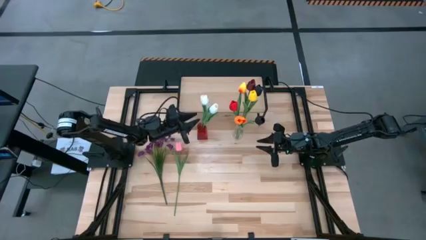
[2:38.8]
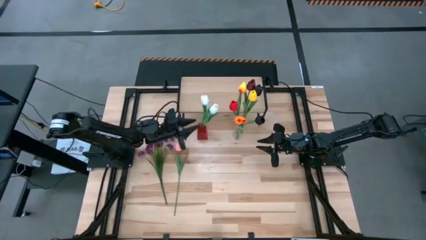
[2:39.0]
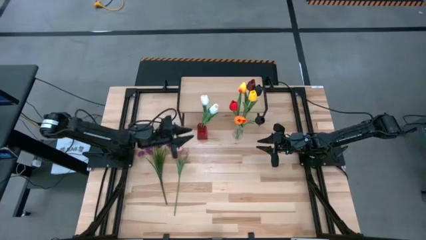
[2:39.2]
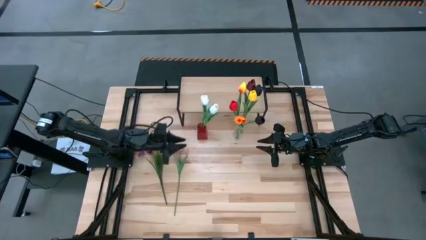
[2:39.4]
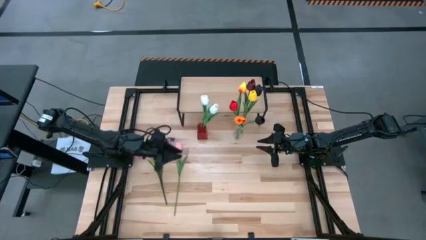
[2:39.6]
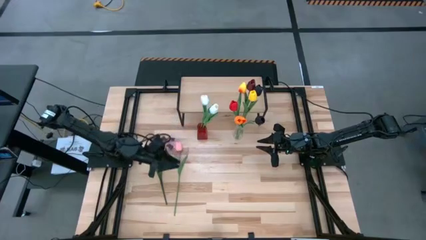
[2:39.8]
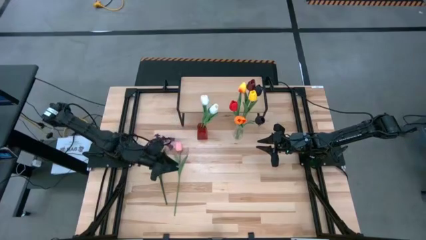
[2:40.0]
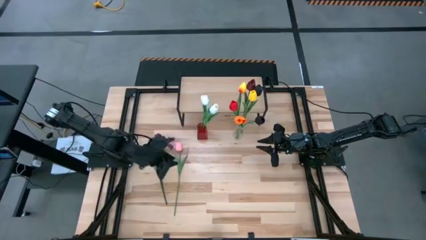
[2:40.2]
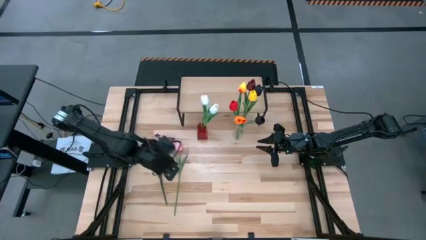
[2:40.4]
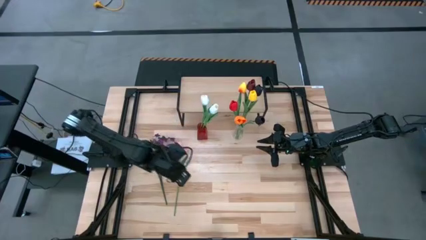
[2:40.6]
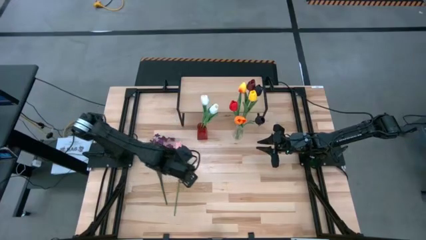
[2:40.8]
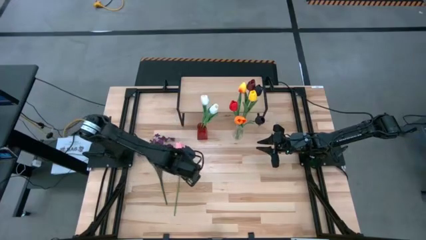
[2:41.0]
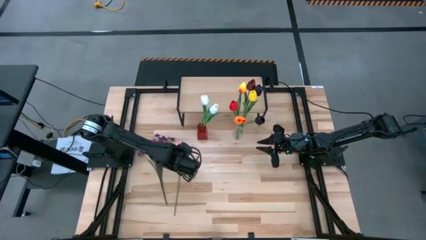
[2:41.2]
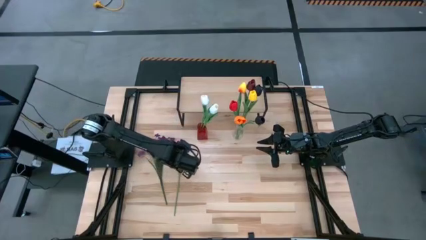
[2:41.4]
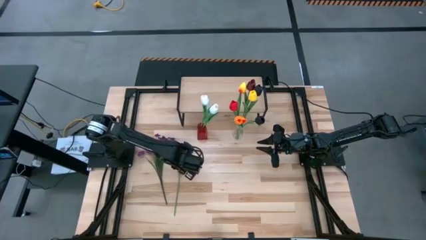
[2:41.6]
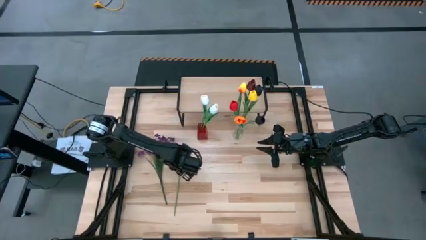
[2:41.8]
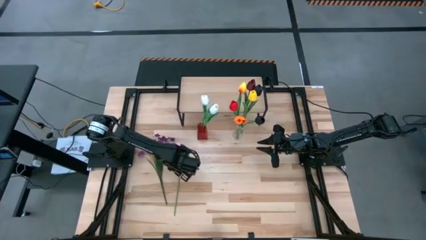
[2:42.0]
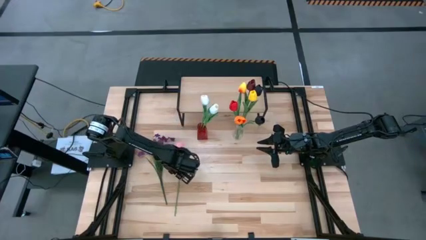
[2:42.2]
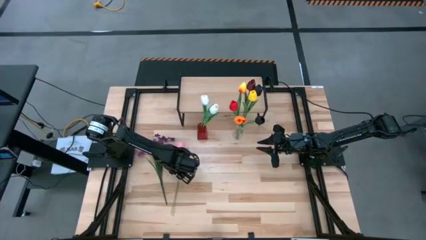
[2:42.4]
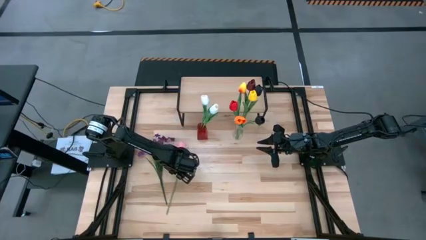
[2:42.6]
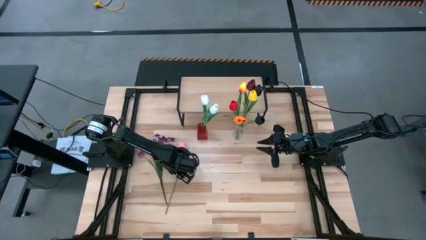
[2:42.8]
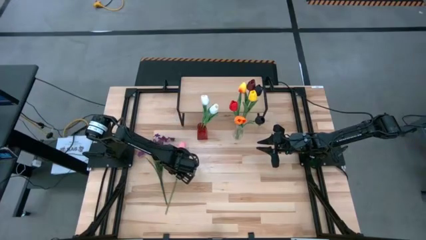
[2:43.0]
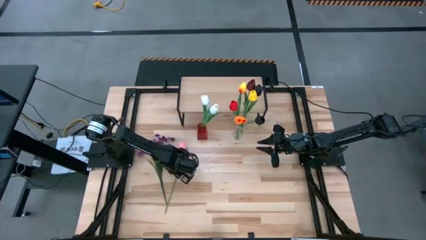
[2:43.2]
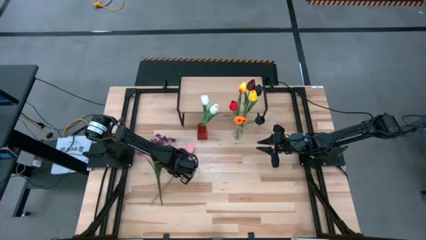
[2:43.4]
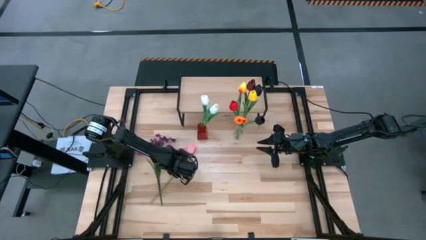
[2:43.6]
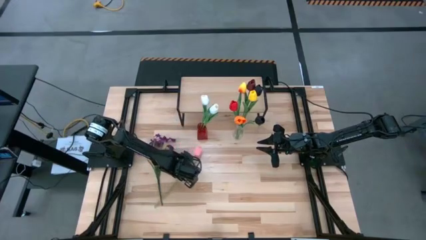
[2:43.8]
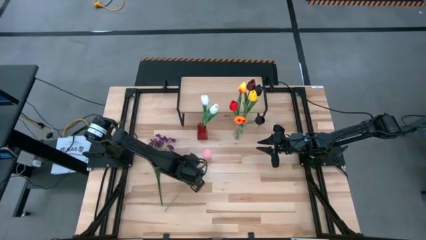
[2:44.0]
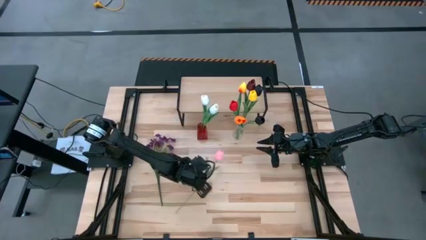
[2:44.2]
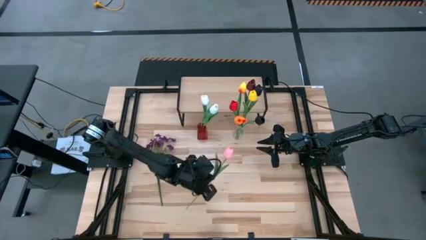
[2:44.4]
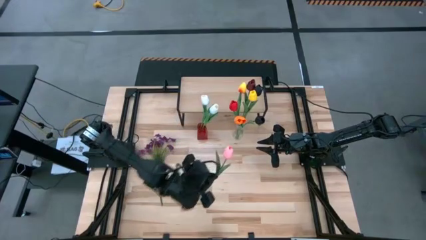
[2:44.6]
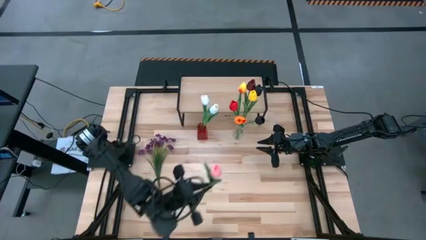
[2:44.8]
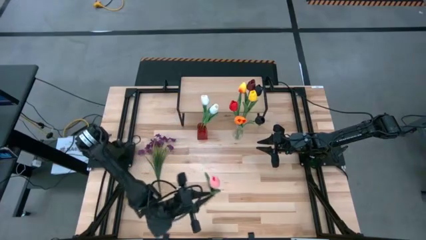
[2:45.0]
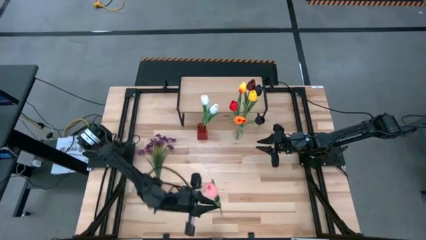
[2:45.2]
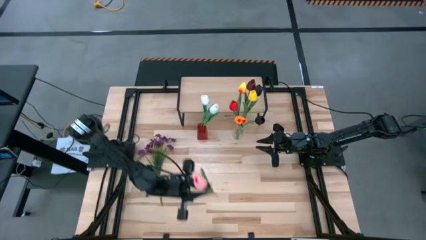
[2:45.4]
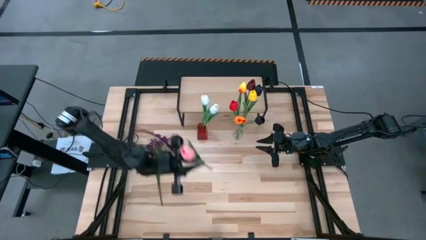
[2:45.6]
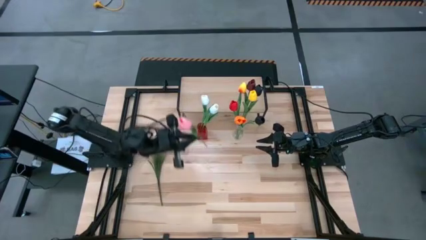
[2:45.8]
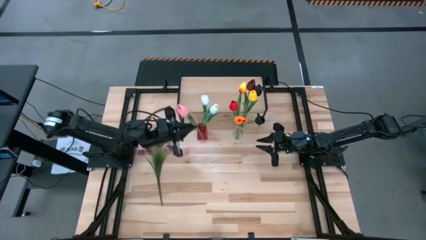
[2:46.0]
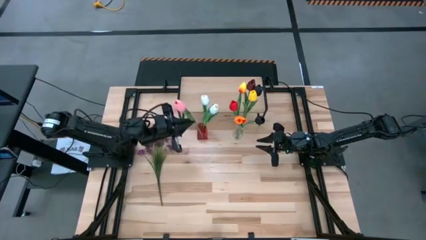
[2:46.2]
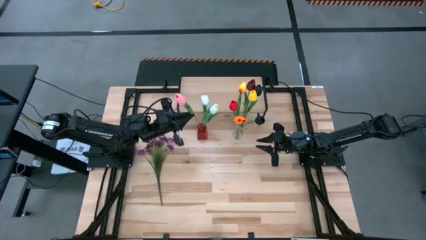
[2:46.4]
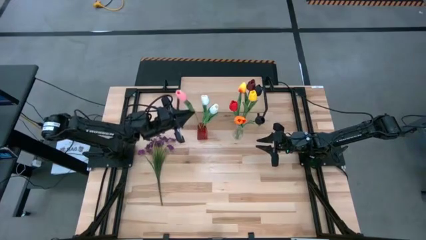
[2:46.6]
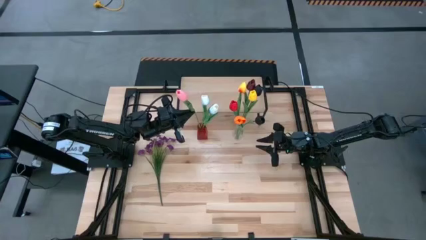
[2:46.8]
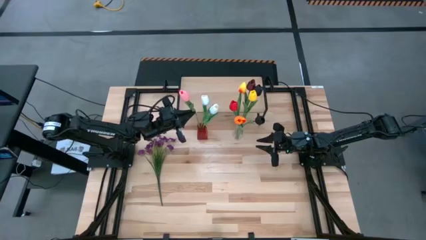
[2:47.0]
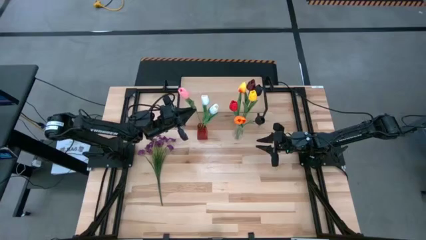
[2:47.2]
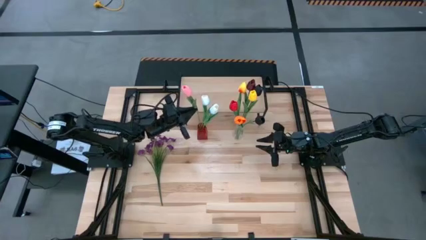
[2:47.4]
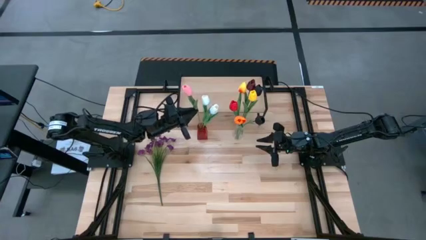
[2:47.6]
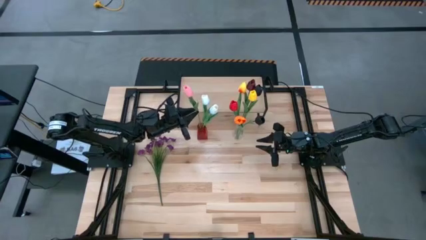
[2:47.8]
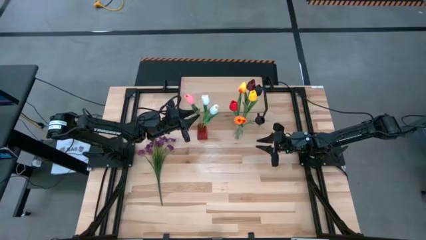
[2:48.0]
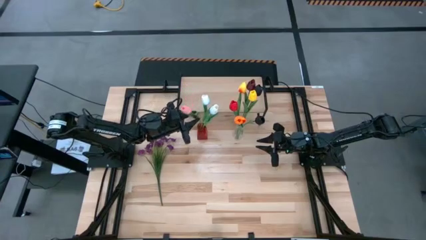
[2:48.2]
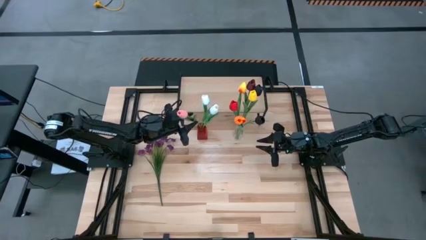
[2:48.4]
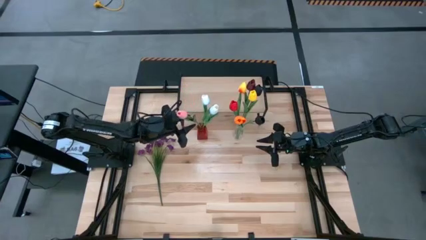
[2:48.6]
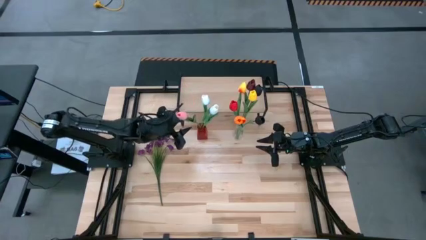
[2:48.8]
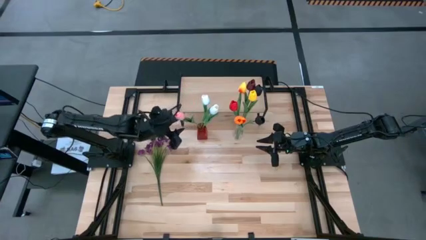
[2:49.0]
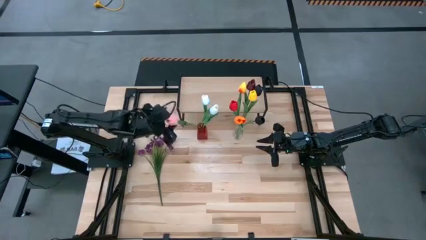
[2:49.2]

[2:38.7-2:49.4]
Task: Pick and place flowers into a vace then onto a shelf
Put the pink flower into the red vase
